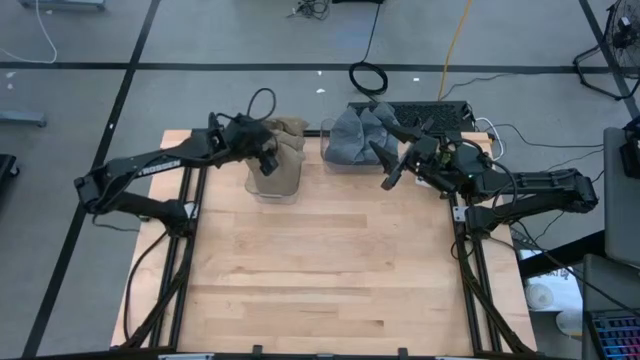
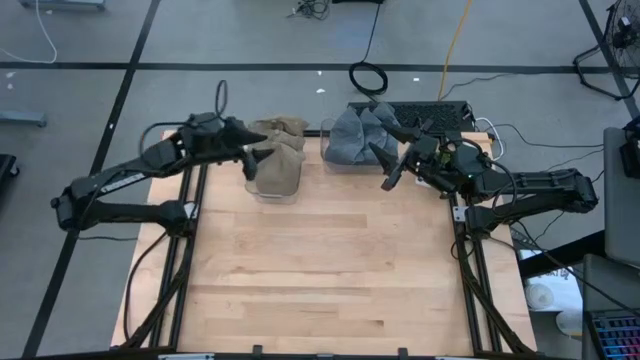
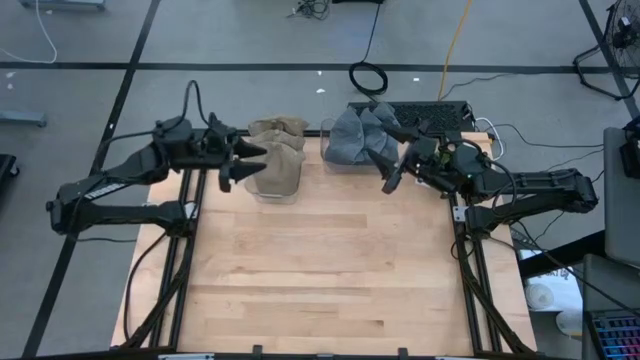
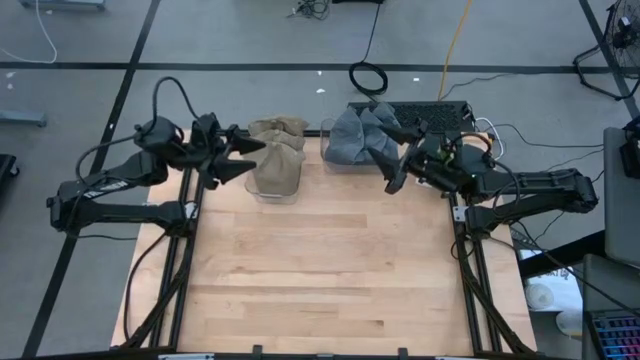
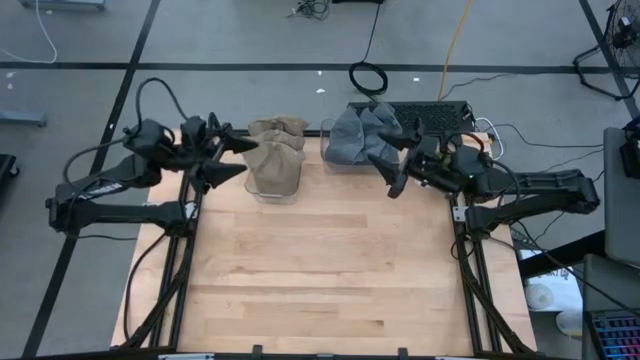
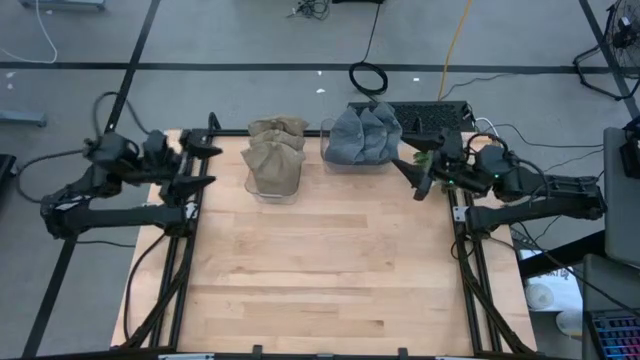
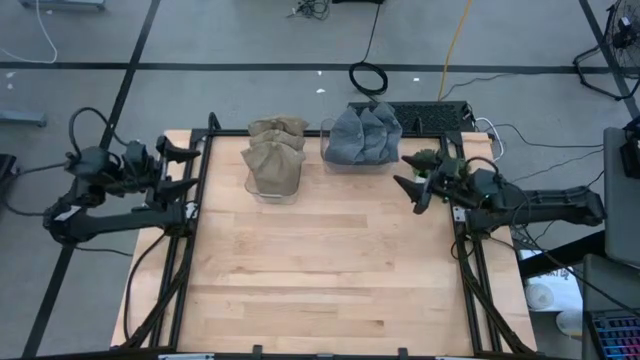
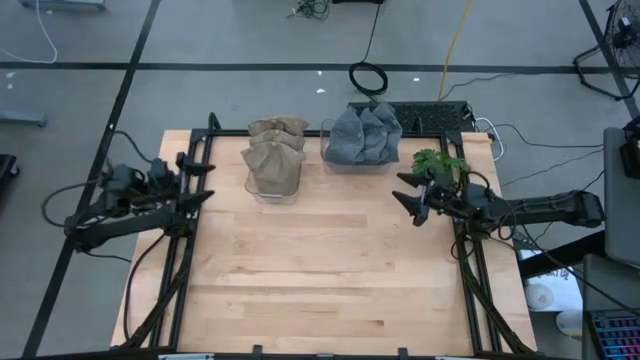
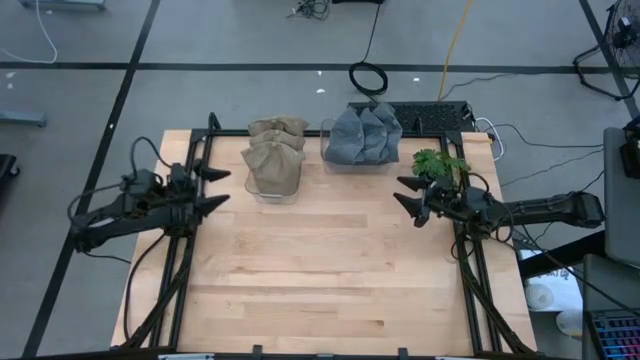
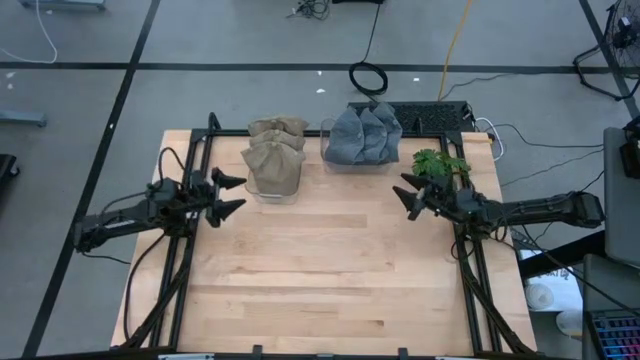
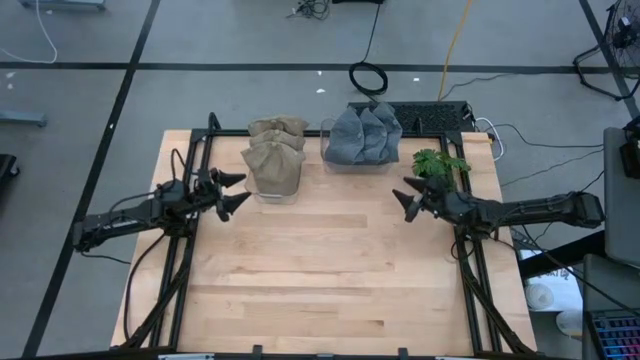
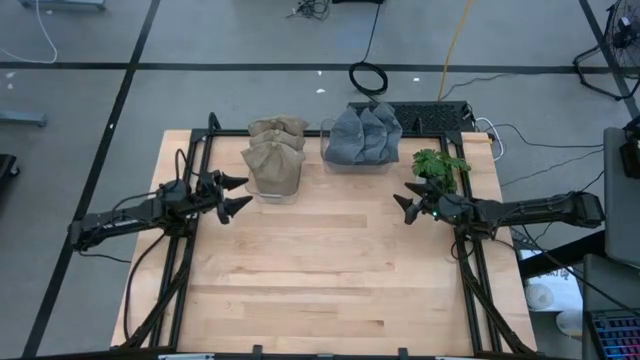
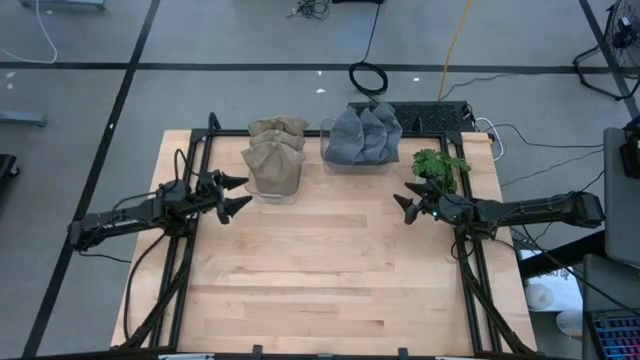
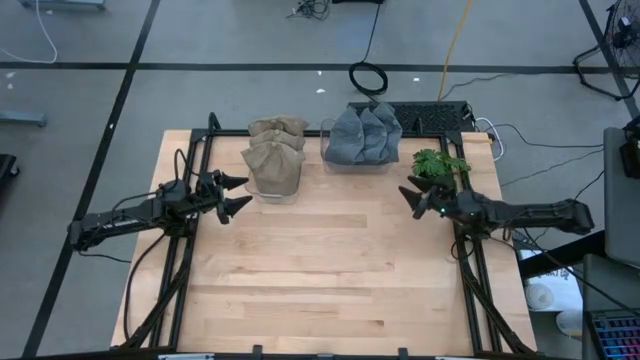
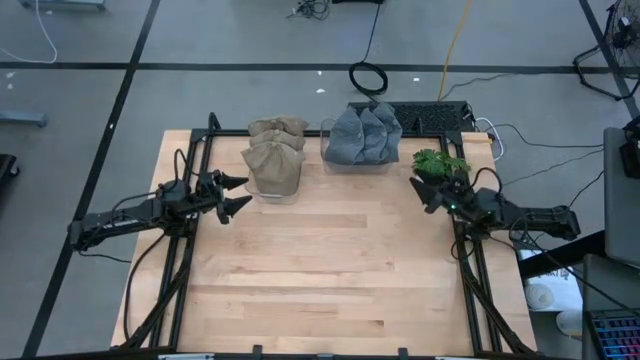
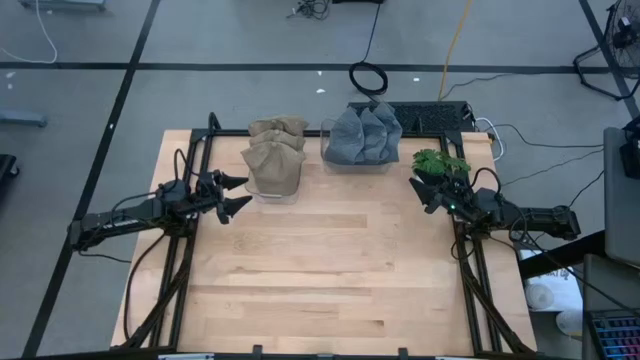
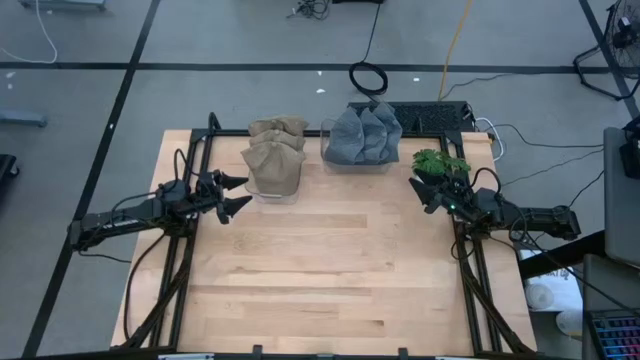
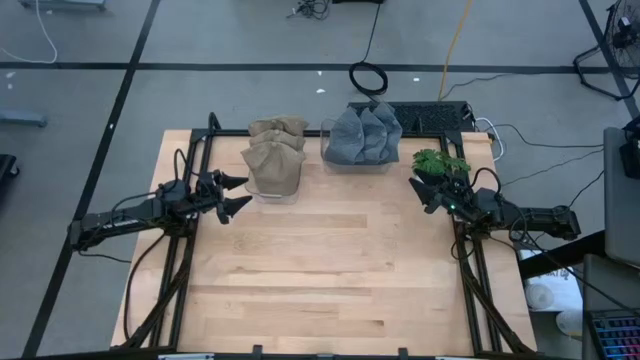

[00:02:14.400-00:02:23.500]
Task: Pick & Place hat
Return to Home Position

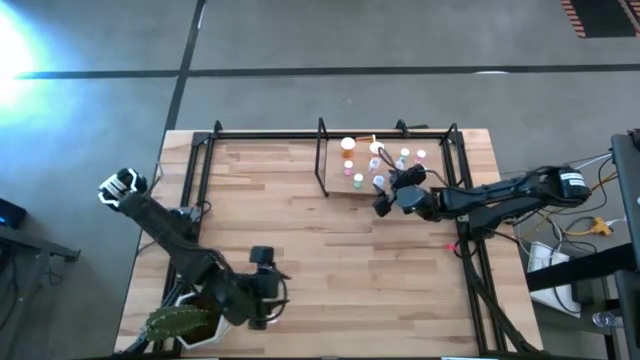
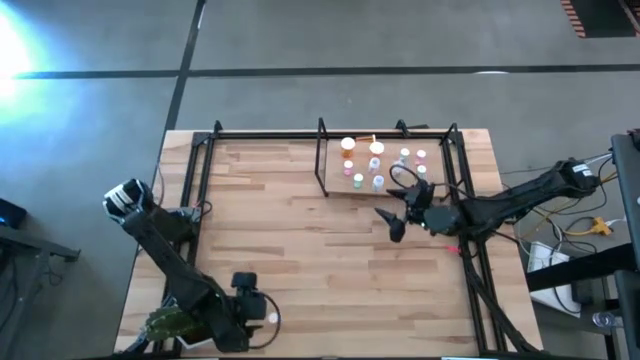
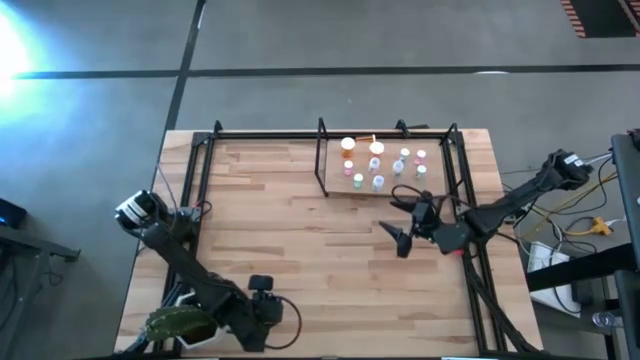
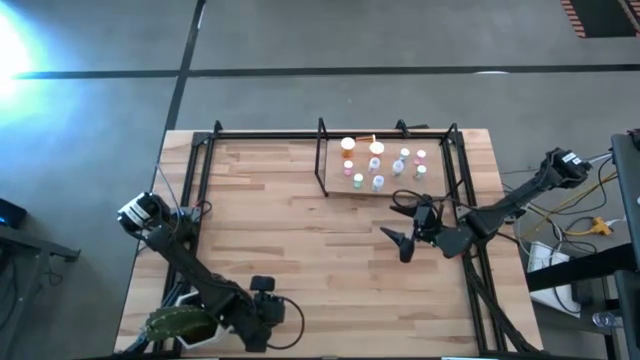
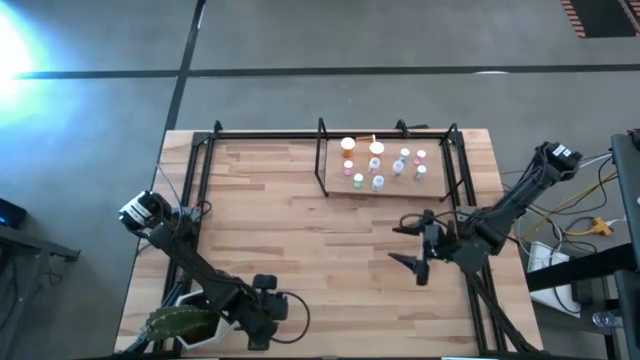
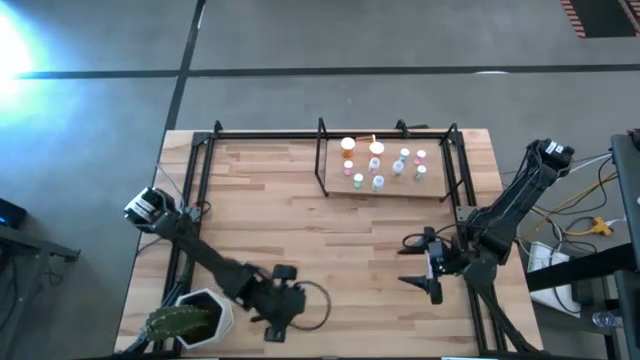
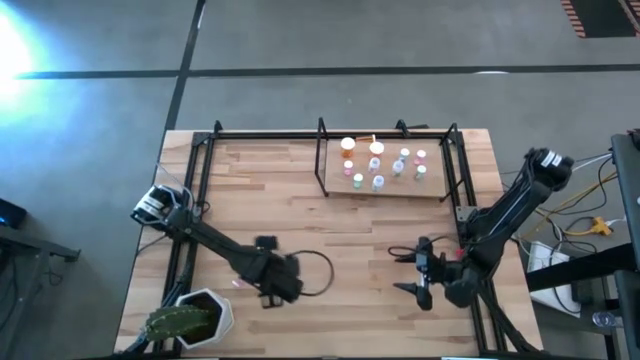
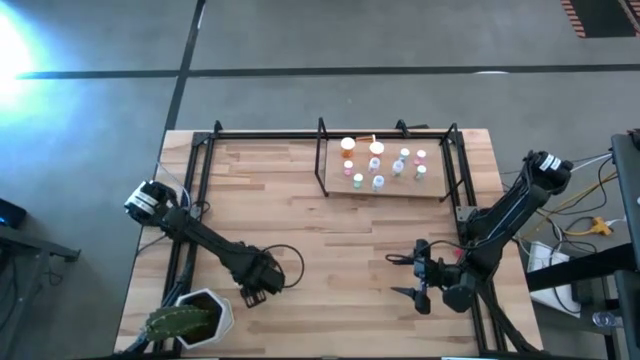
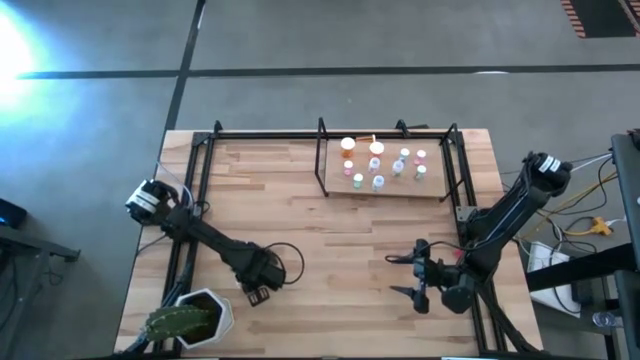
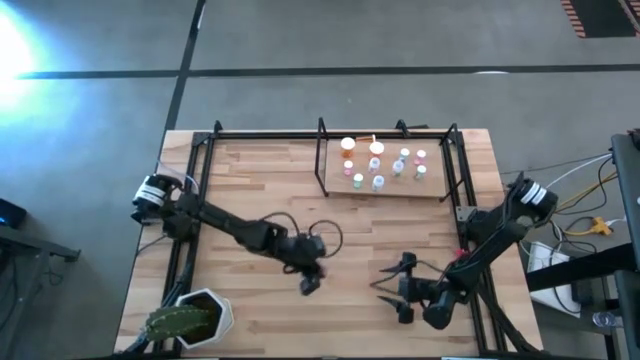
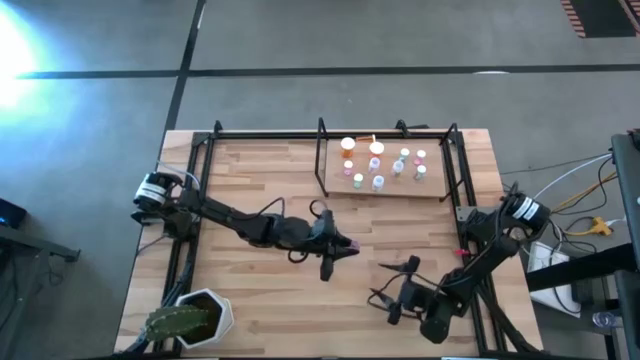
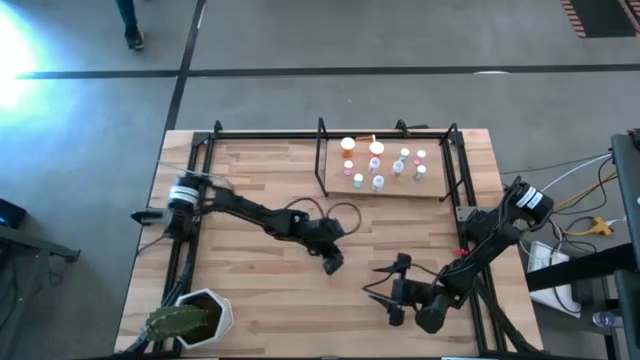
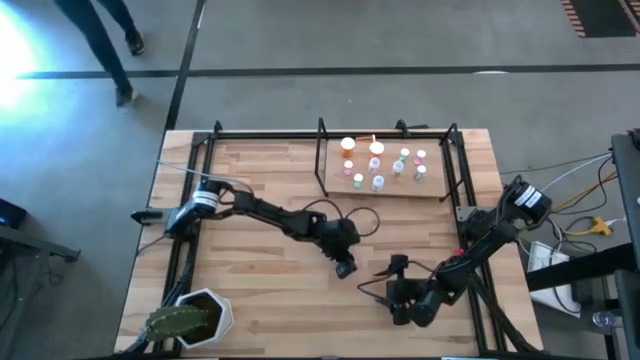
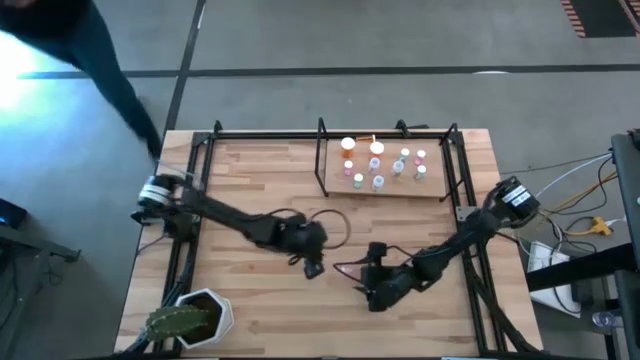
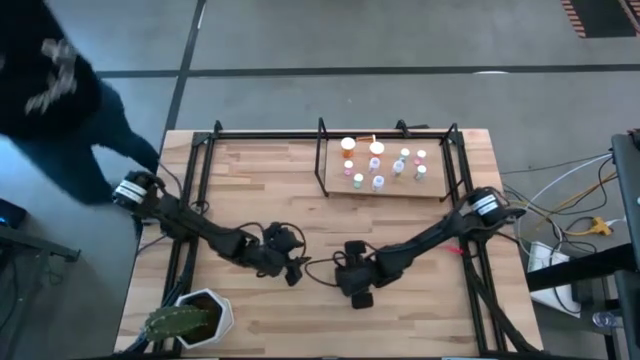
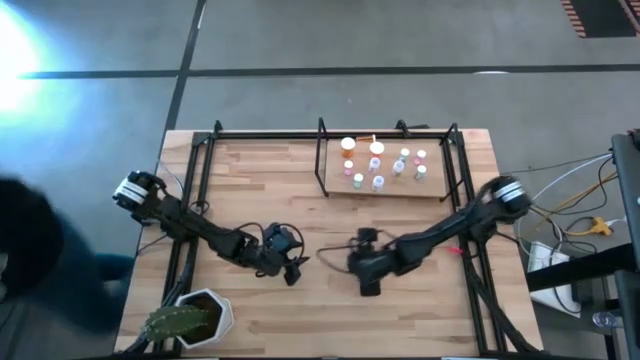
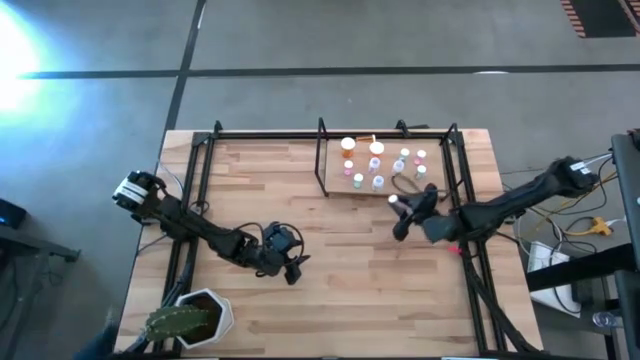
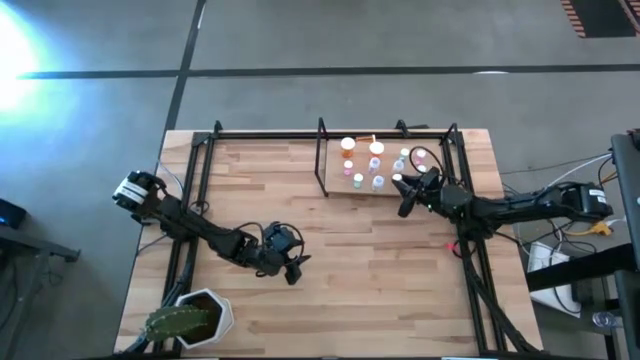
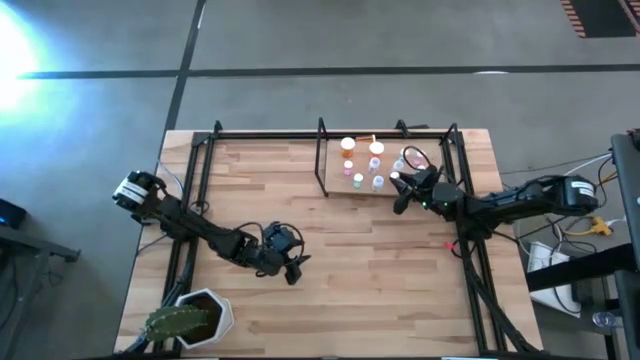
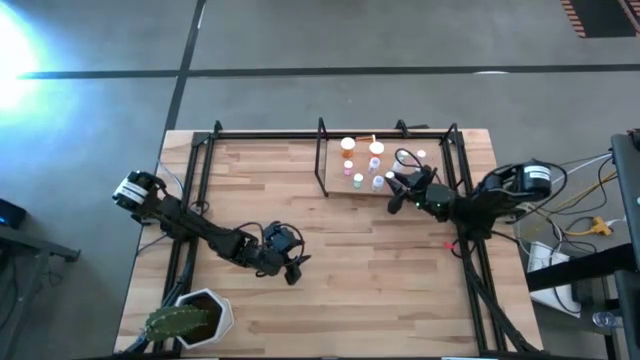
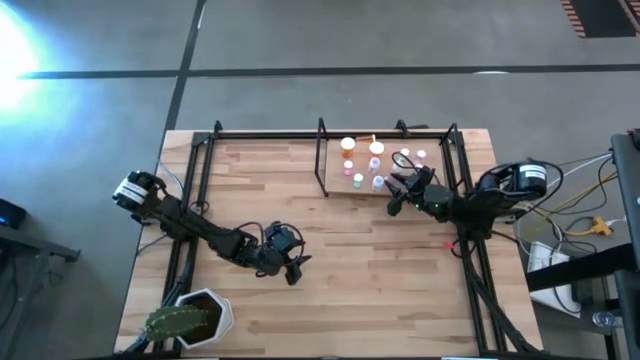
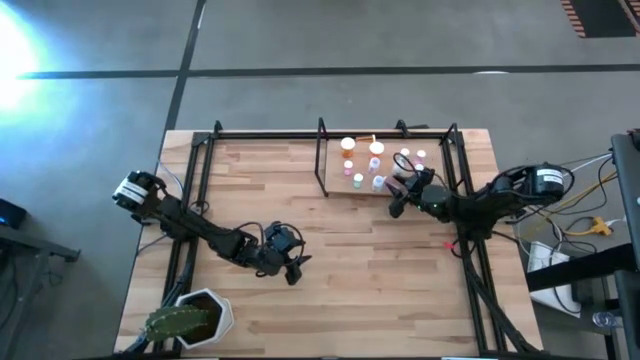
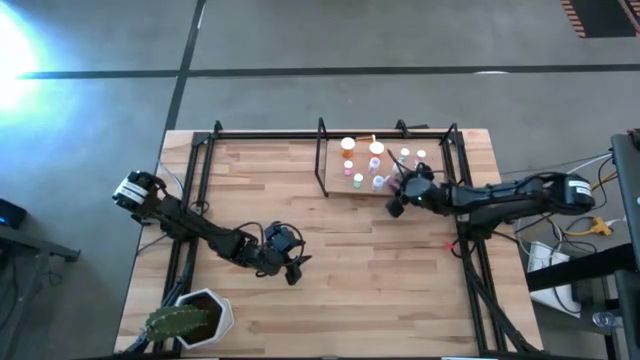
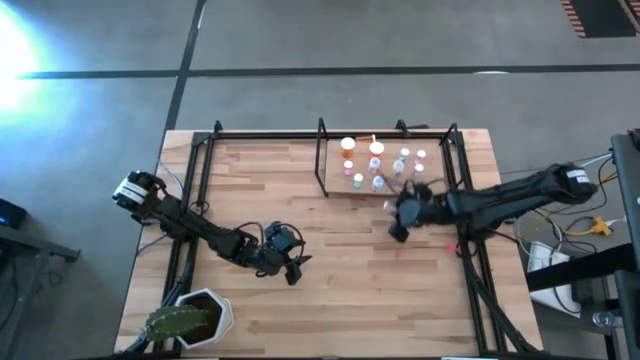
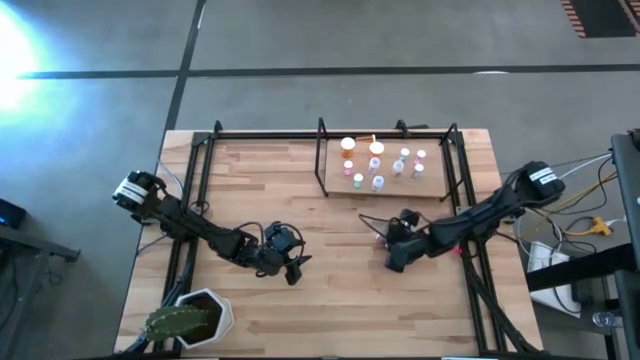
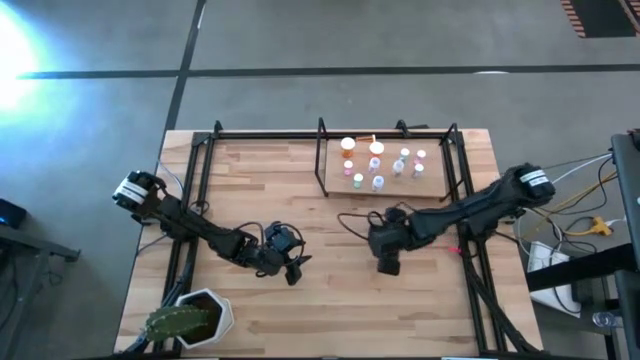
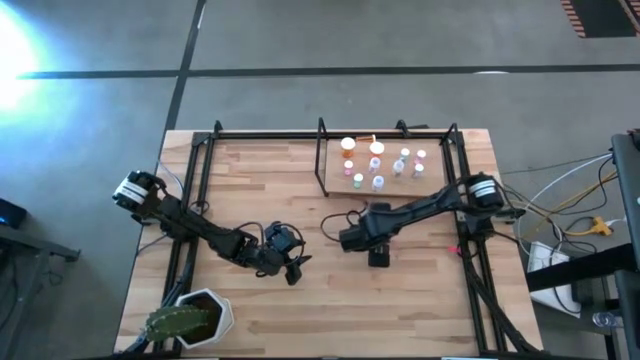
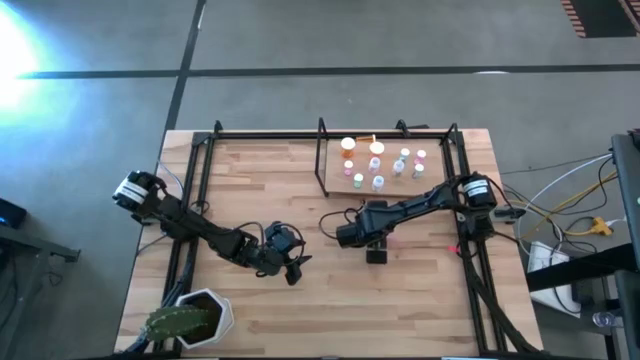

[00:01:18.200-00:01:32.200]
Task: Pick and place medicine bottles onto shelf by color
Put the pink pill bottle on the shelf
